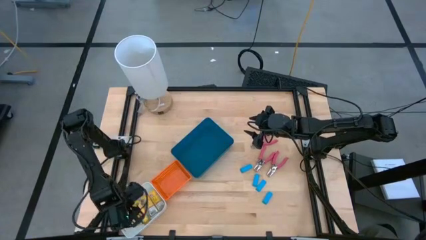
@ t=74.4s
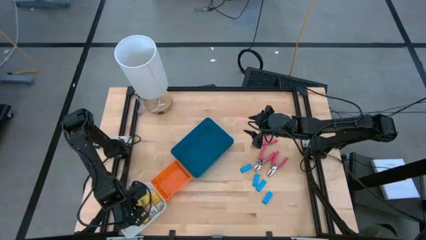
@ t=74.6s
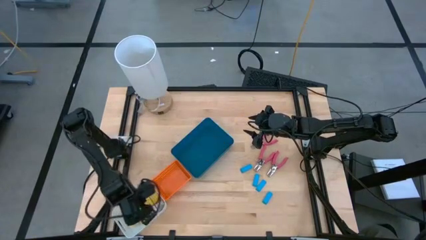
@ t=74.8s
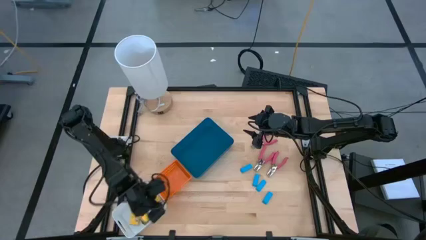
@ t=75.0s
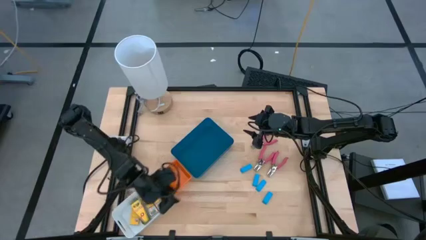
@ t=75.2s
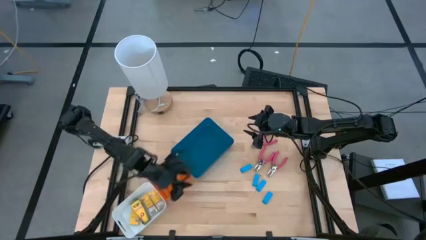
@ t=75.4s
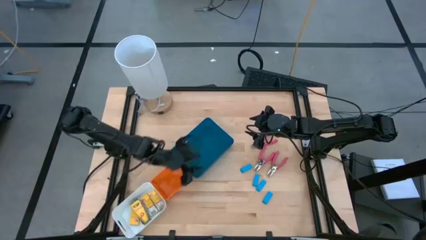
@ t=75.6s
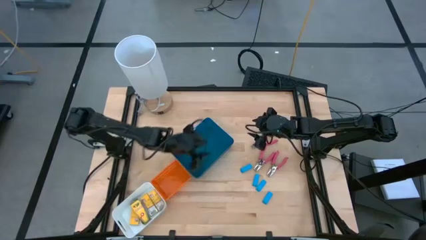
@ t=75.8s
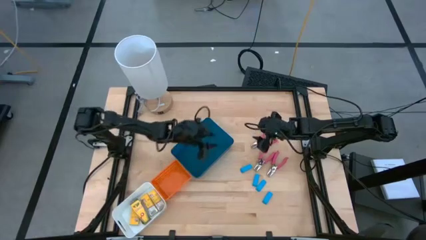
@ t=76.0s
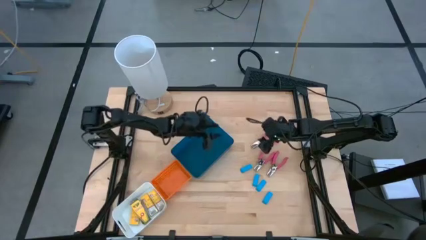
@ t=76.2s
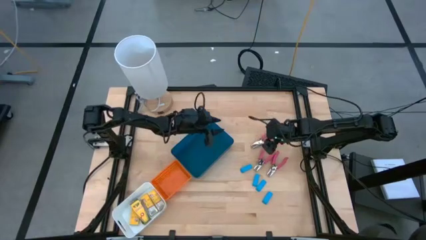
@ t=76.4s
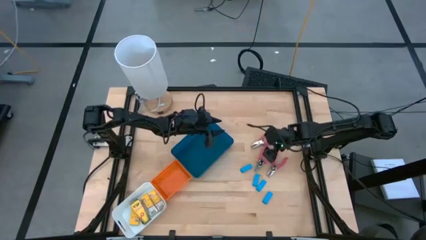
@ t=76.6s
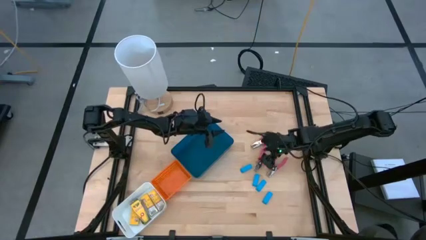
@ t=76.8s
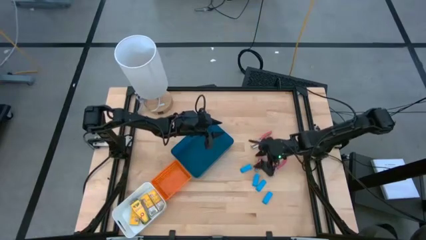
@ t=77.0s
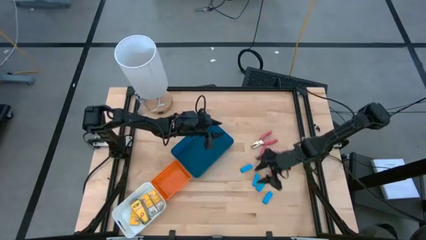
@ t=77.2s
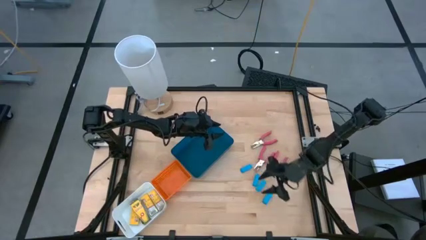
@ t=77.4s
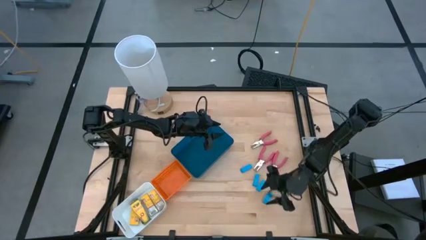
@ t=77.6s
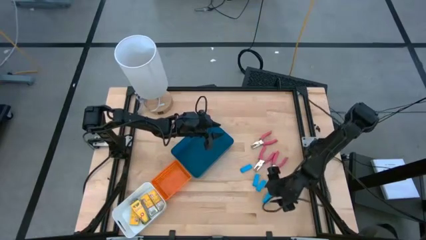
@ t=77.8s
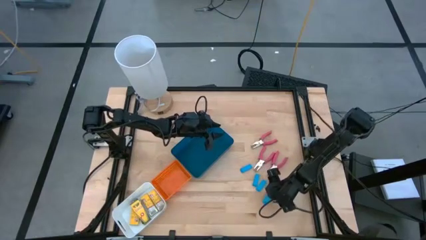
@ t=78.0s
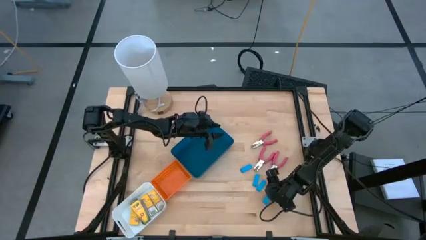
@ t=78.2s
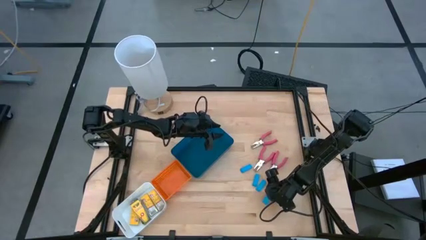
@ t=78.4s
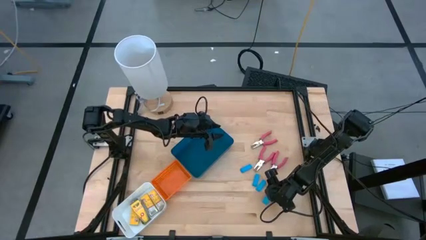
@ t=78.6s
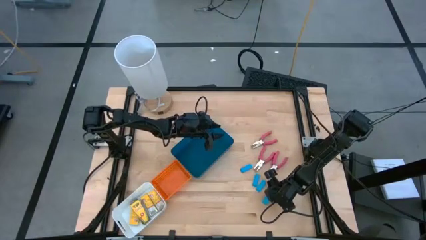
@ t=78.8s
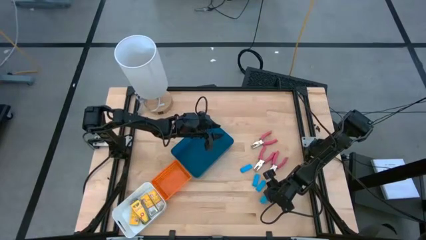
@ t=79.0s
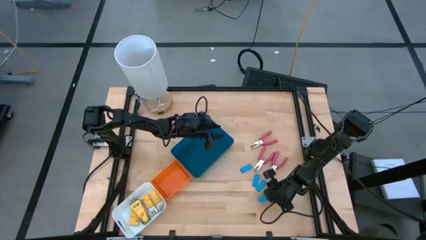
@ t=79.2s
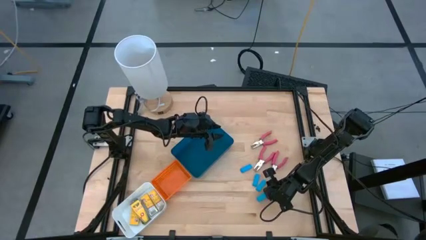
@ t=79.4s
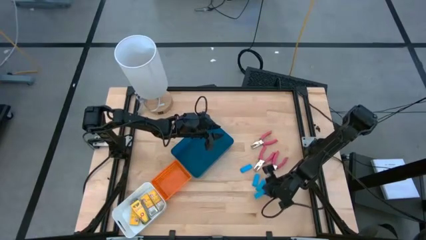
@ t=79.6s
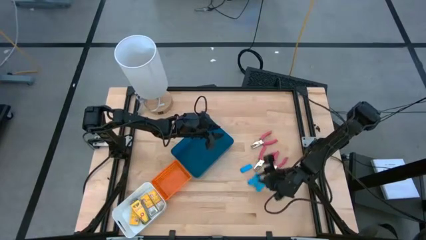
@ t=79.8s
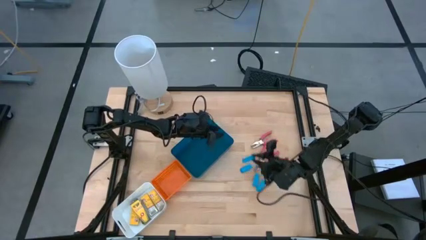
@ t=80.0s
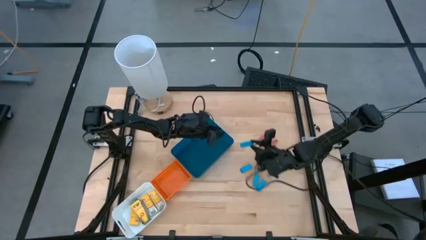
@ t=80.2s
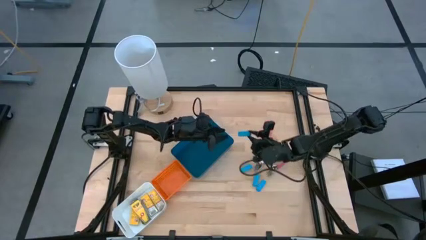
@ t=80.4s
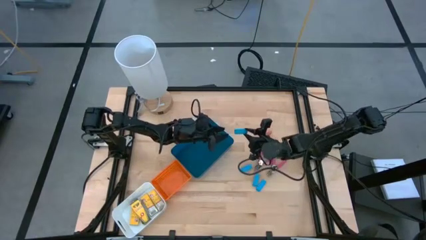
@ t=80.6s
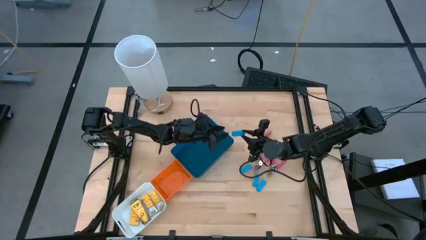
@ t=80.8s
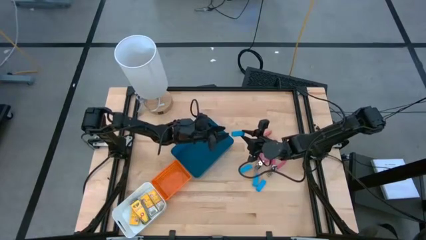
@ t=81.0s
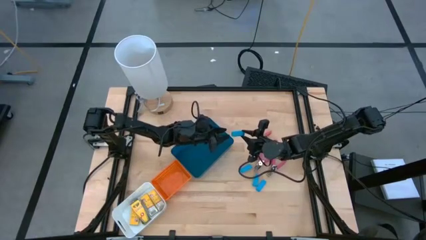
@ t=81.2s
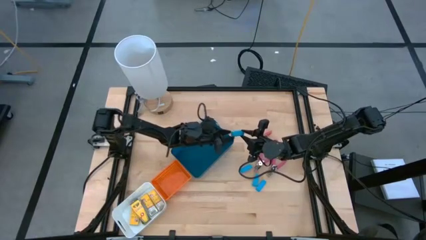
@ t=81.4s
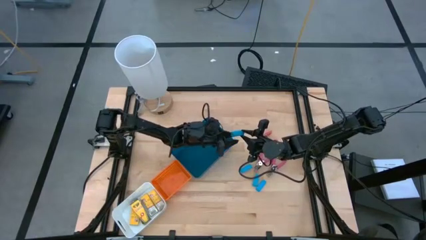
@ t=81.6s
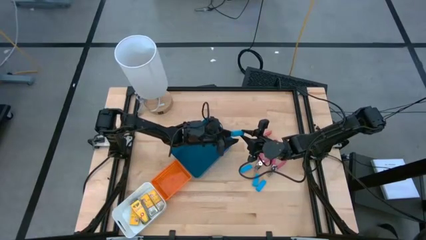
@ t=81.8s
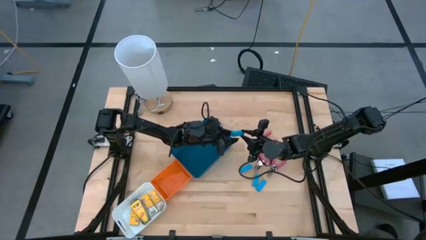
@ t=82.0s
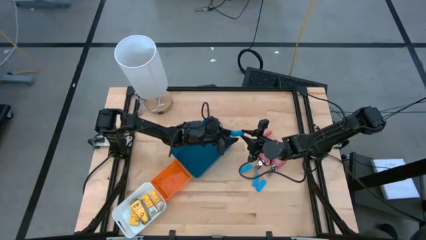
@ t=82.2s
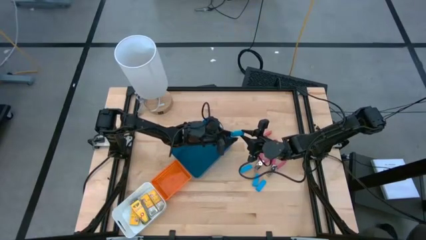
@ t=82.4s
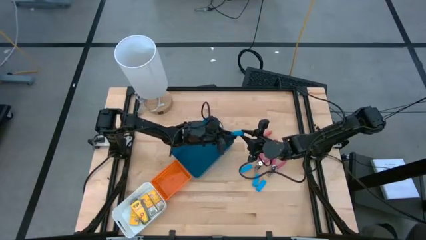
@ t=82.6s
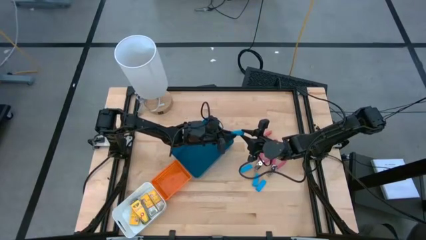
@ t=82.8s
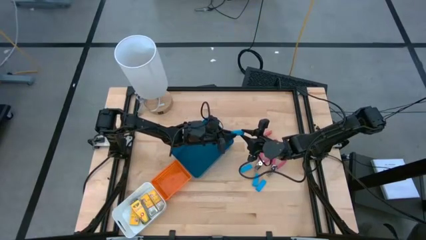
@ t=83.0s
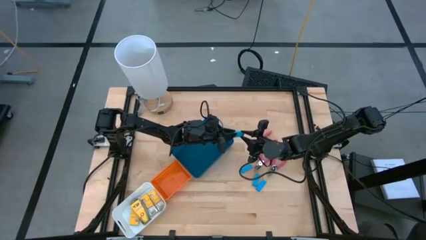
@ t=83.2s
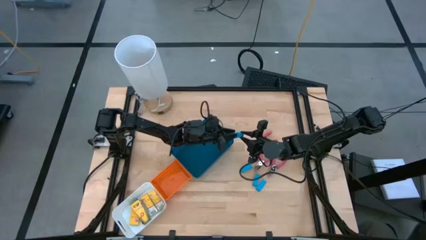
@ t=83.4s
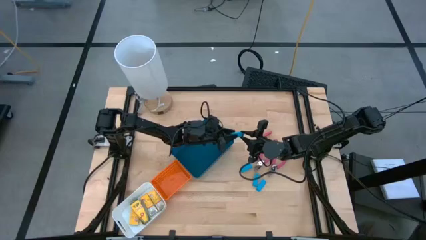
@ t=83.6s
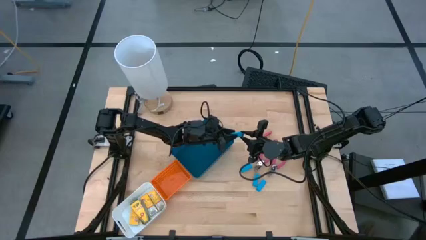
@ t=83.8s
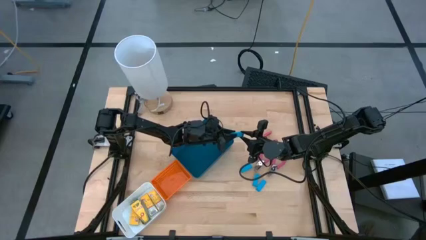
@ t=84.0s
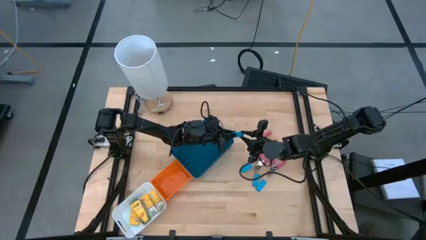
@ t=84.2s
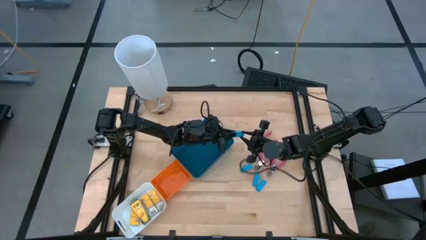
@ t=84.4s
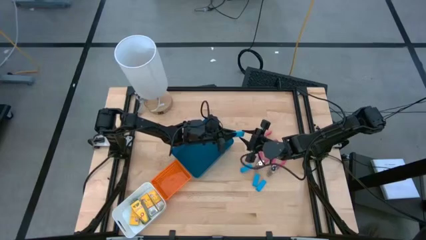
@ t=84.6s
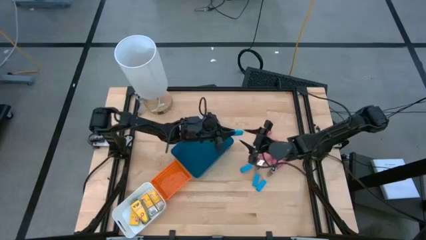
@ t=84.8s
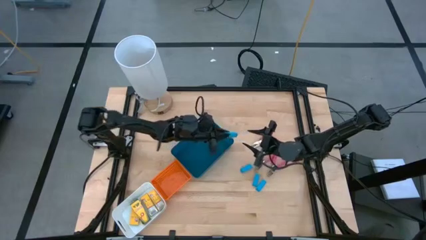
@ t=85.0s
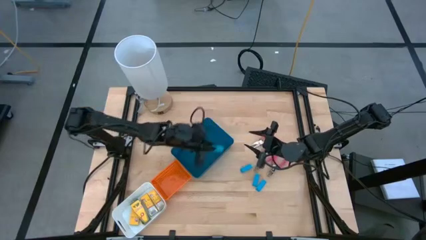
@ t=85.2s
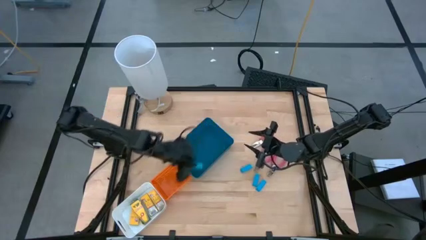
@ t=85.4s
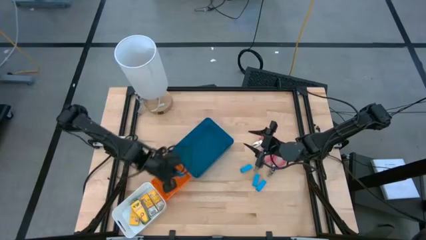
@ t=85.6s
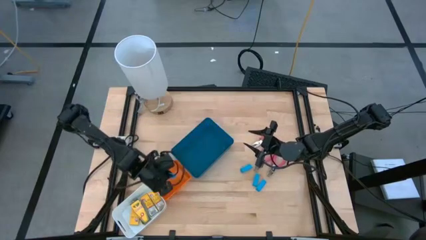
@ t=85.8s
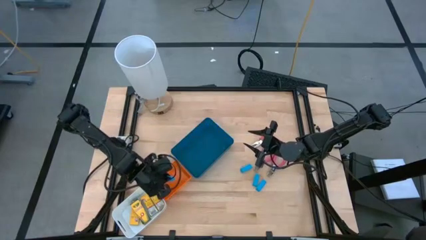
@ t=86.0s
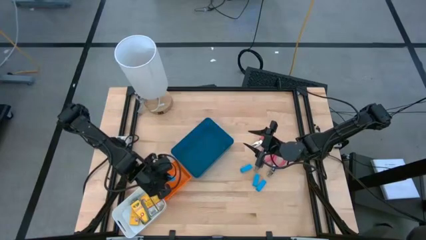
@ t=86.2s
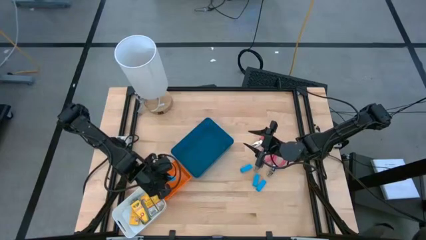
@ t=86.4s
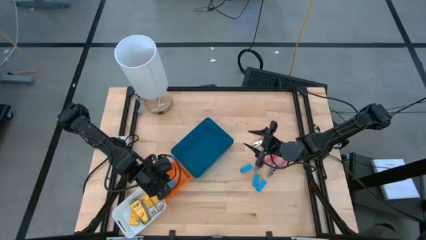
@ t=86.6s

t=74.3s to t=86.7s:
Task: Pick & Place School Supplies
Put the blue eraser into the orange bin

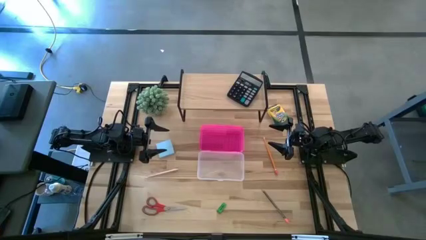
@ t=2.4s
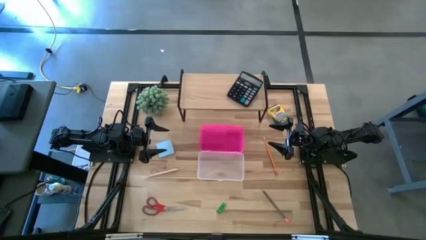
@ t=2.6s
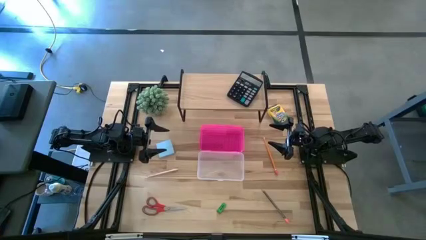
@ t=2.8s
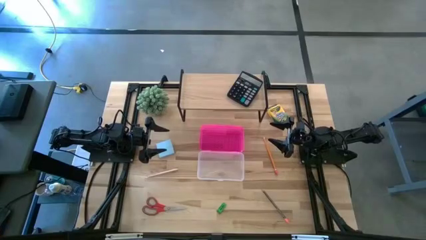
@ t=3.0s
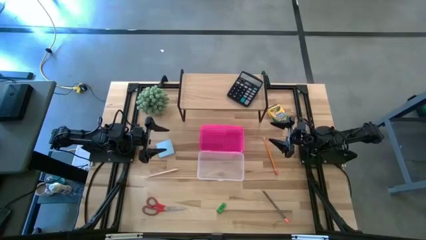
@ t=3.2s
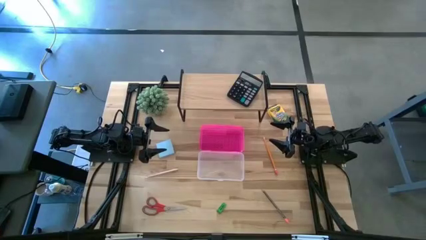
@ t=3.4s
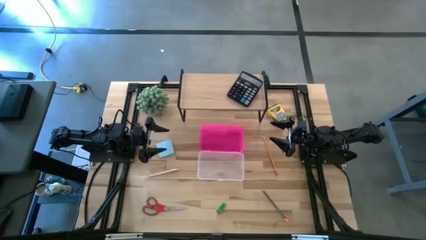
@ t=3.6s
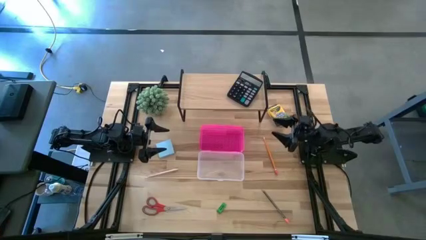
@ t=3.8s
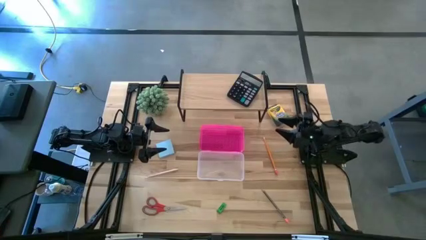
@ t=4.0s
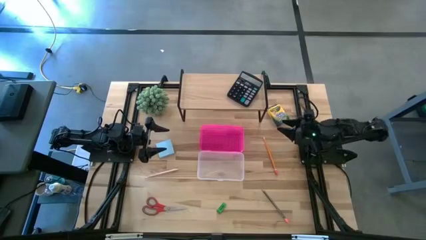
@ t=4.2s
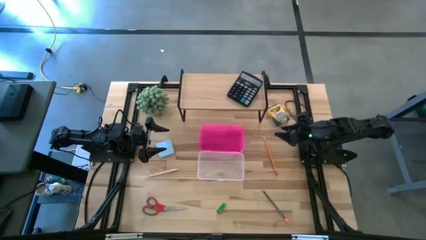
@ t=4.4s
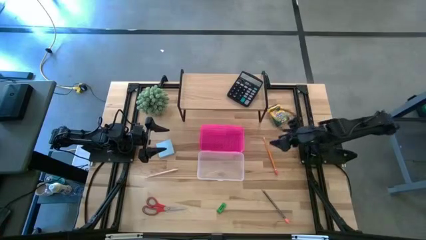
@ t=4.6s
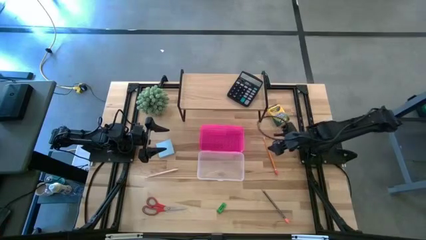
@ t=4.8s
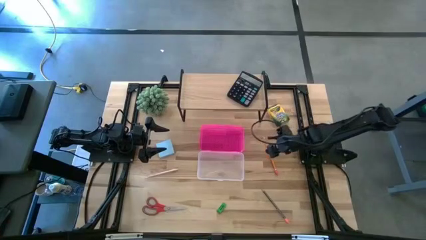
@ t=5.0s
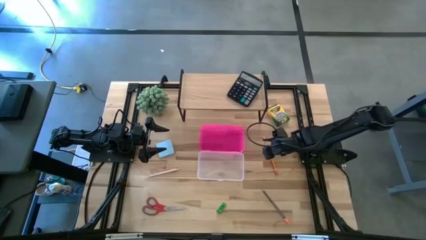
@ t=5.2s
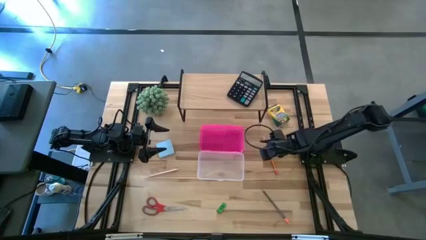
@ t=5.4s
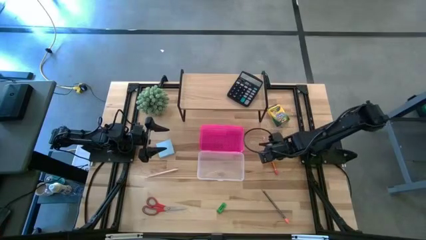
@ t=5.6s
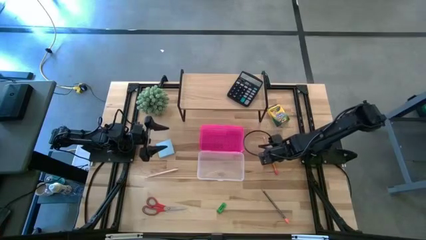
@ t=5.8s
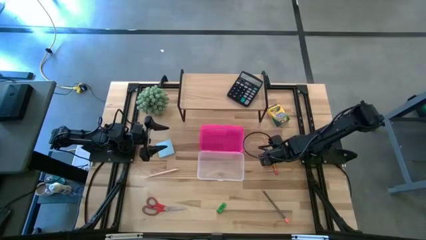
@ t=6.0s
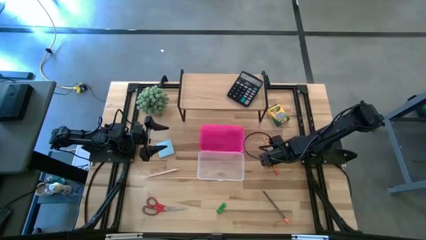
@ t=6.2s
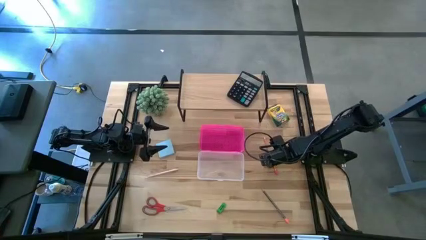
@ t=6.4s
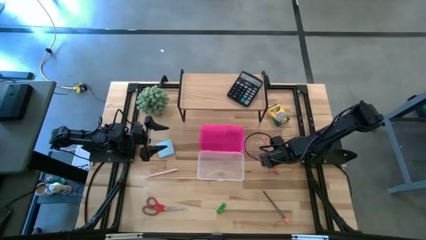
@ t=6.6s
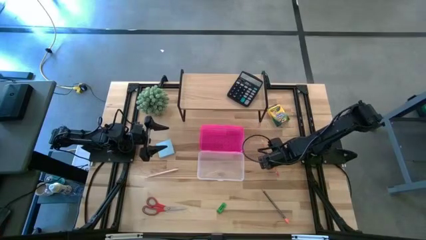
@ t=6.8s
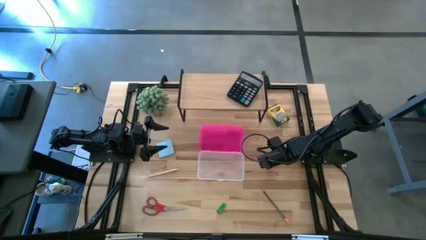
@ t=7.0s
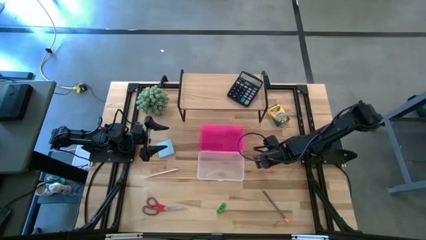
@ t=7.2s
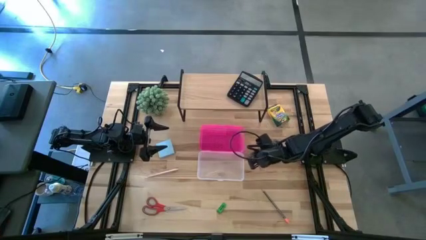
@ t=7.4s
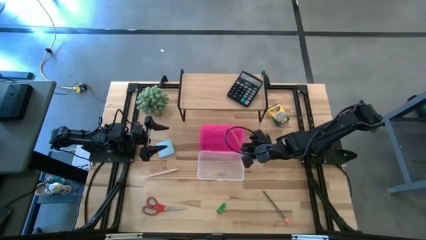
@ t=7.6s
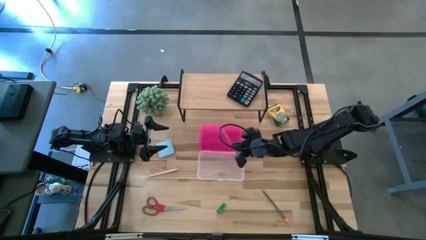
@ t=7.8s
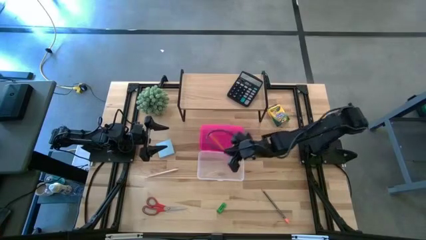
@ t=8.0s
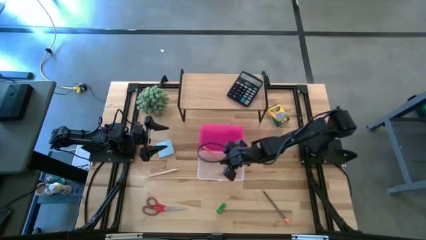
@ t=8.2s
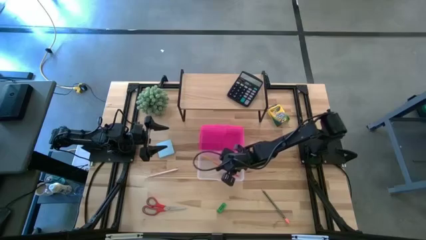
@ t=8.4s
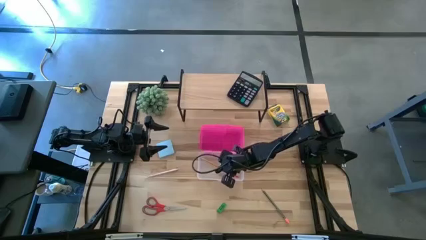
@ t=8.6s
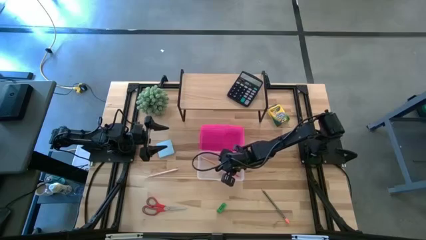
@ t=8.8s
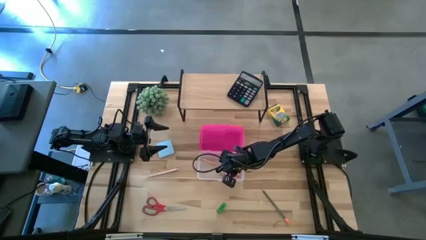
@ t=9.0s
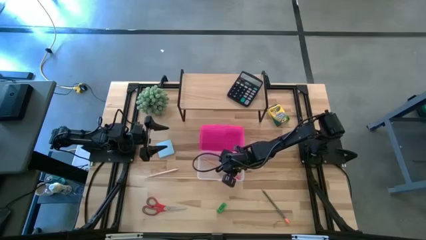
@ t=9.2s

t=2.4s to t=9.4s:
Task: Pack school essentials
Put the orange pencil into the transparent bin
